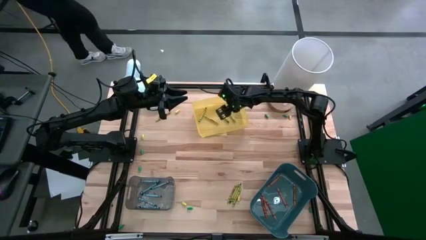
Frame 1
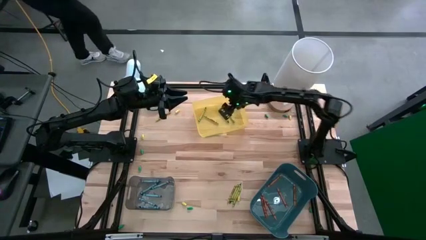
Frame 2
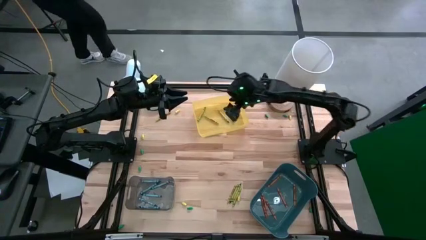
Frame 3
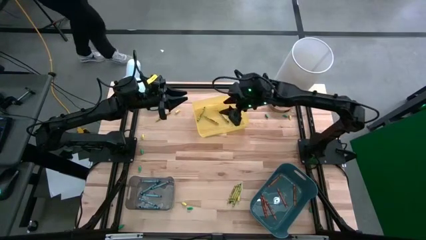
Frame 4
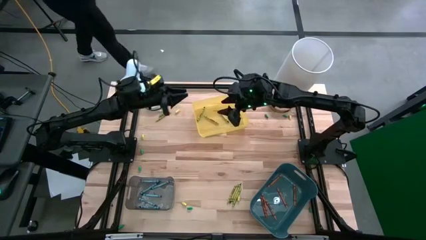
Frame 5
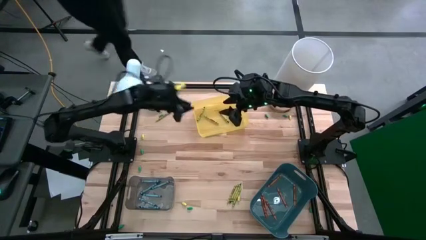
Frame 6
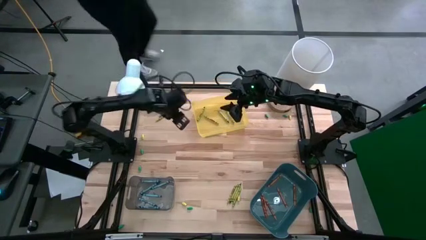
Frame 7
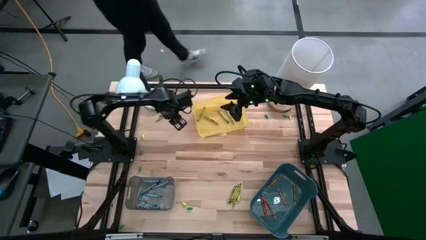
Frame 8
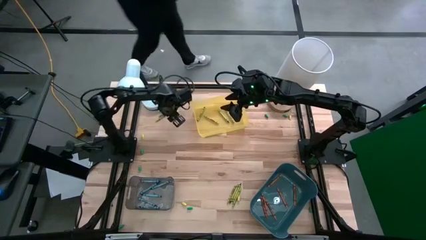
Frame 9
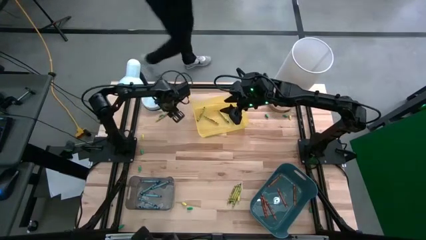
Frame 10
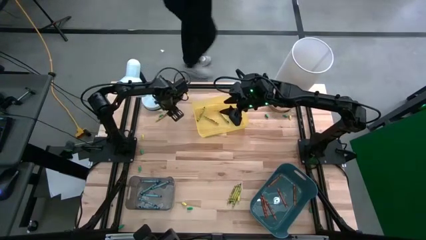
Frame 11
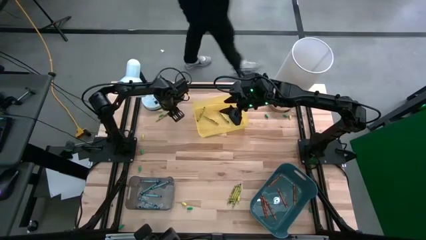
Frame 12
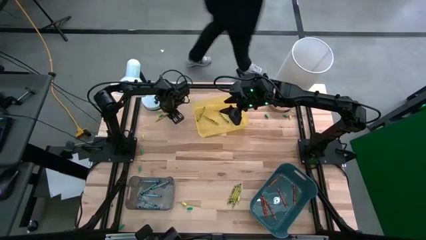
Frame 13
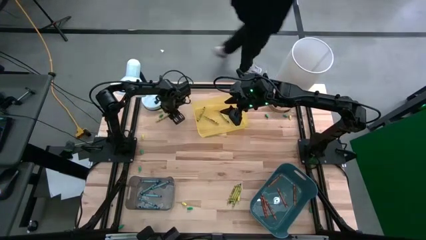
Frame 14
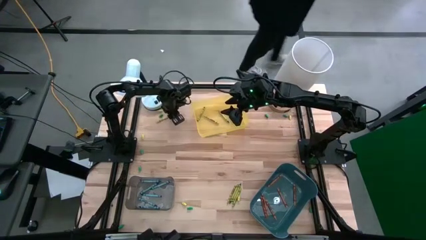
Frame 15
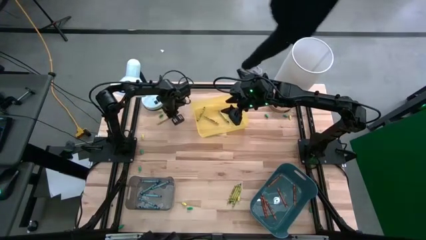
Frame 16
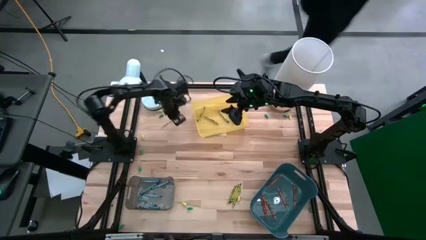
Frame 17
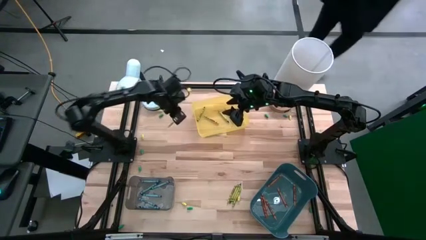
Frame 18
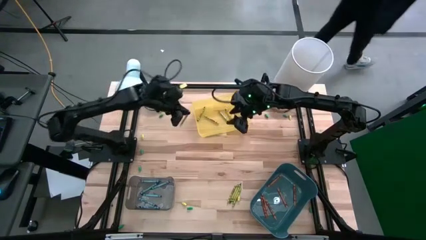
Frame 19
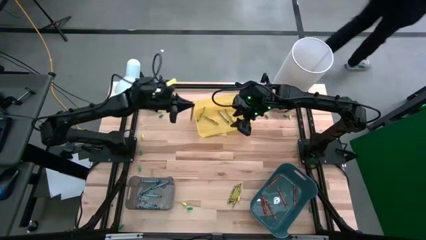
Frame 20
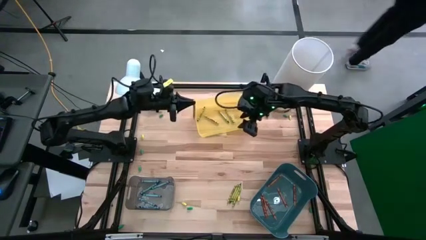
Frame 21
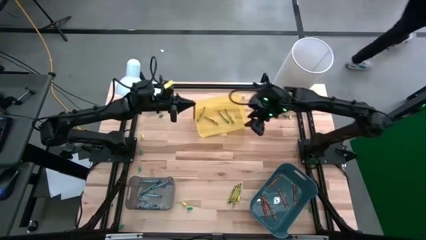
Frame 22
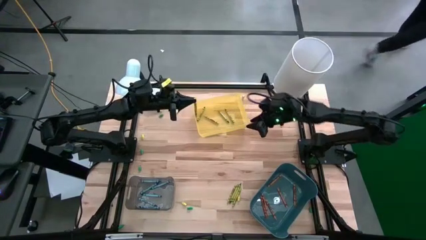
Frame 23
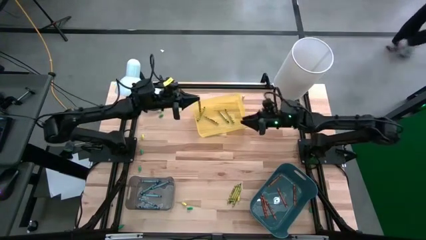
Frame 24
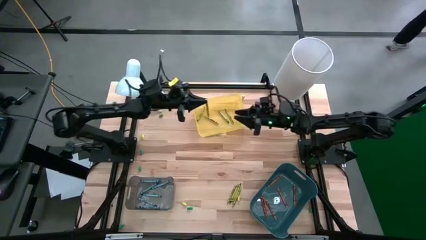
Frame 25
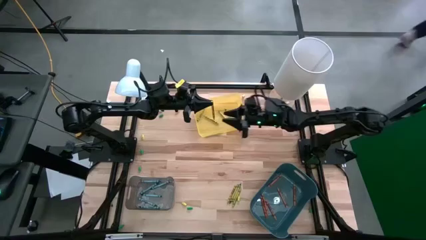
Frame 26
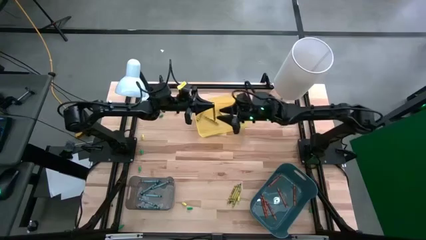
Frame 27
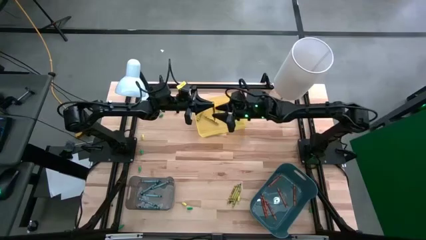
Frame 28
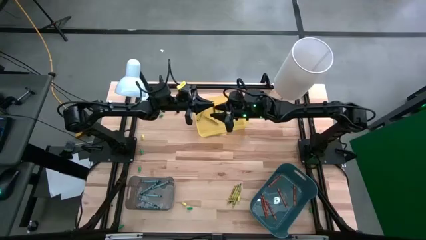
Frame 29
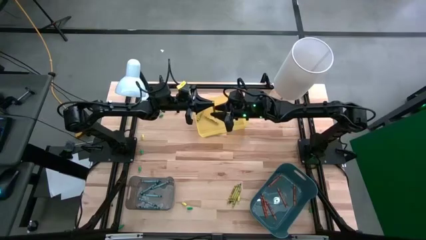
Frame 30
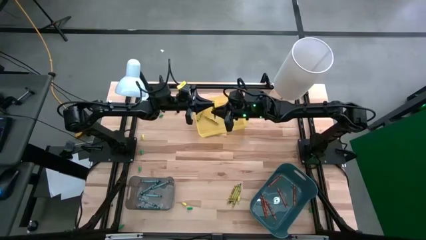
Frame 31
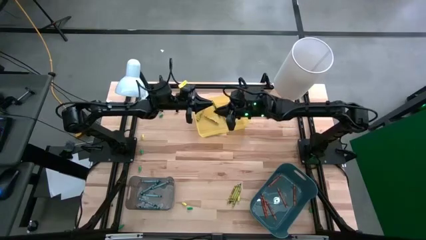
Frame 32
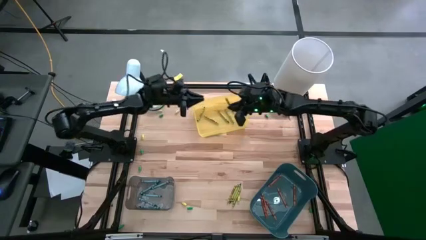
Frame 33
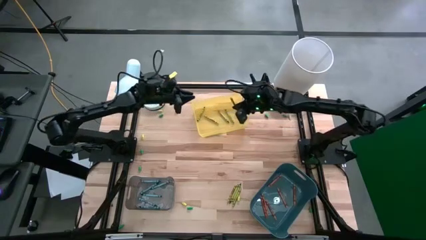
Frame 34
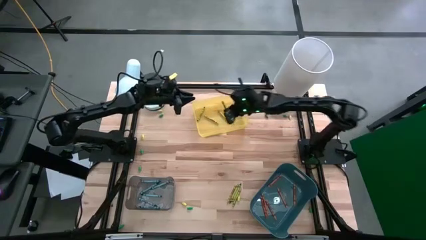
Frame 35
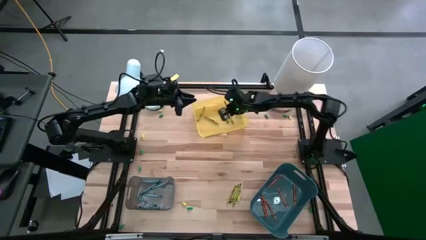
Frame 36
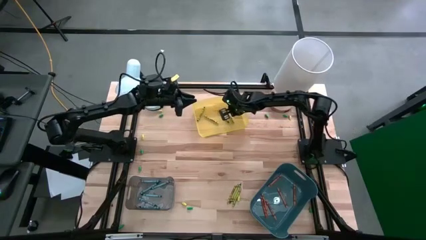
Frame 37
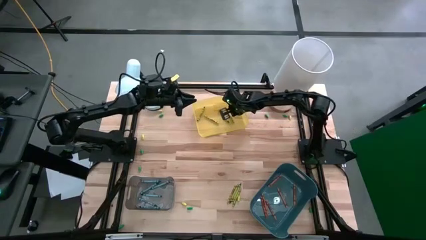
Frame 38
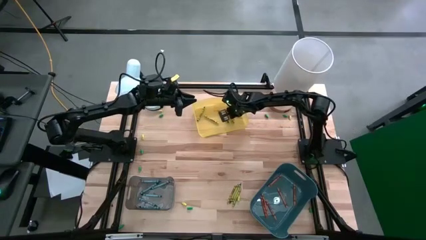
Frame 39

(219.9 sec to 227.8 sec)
Task: Sort crayons
Put the yellow green crayon into the yellow bin

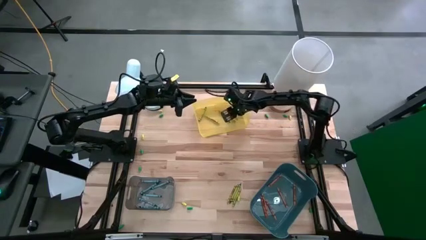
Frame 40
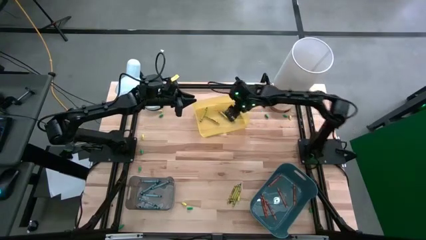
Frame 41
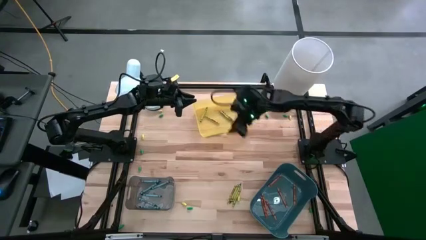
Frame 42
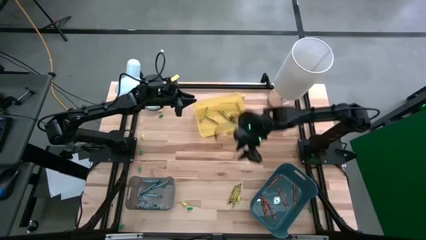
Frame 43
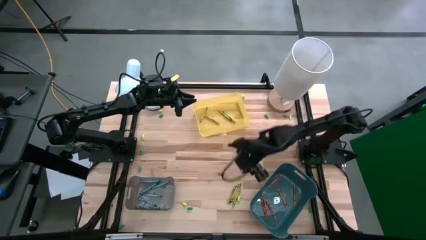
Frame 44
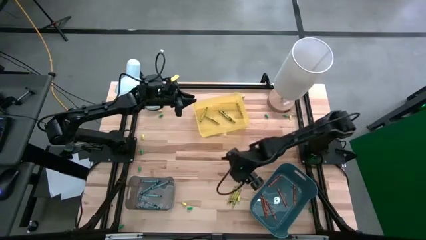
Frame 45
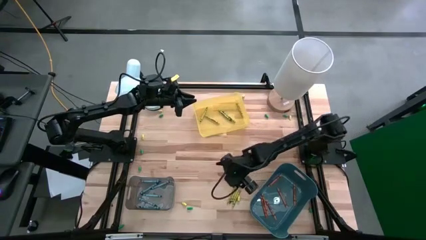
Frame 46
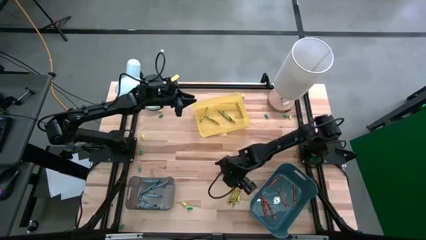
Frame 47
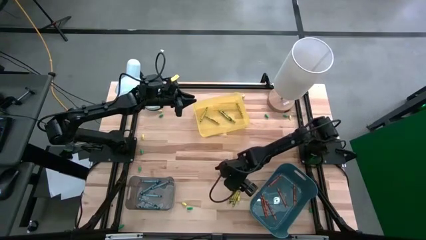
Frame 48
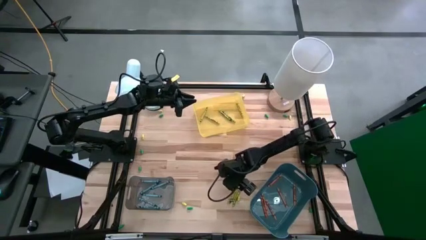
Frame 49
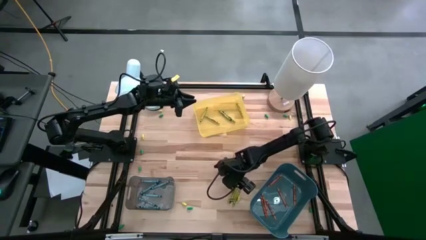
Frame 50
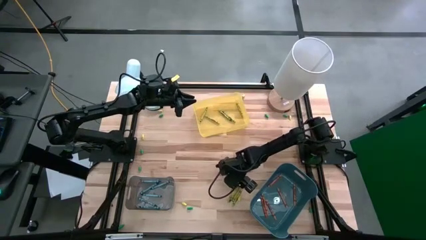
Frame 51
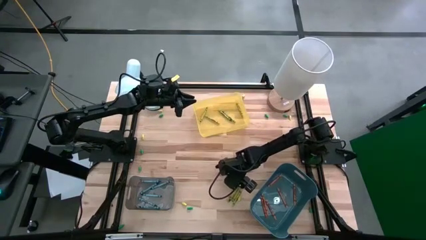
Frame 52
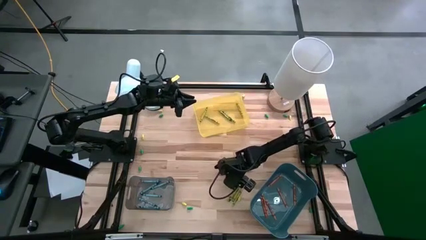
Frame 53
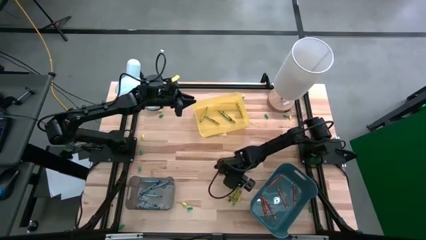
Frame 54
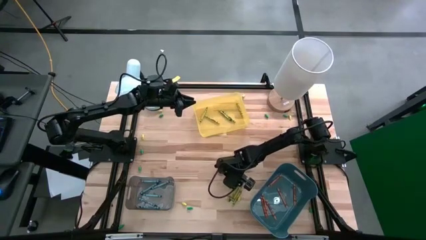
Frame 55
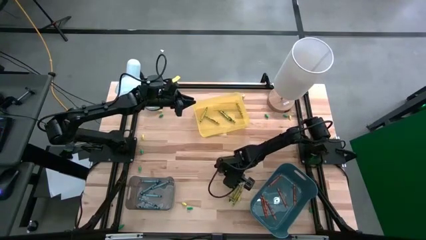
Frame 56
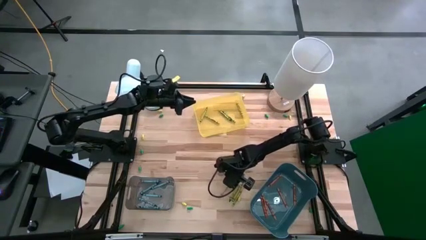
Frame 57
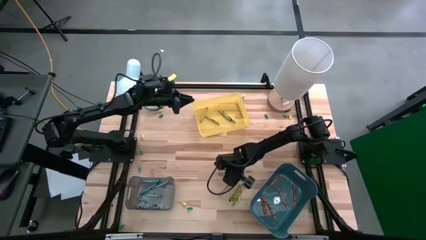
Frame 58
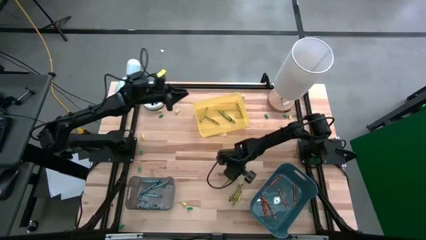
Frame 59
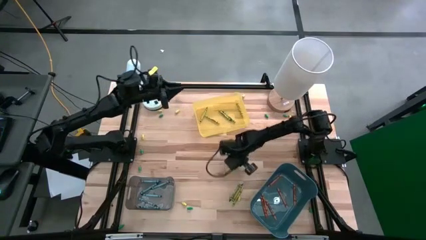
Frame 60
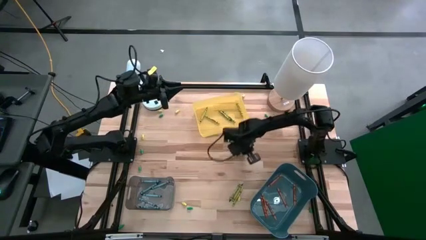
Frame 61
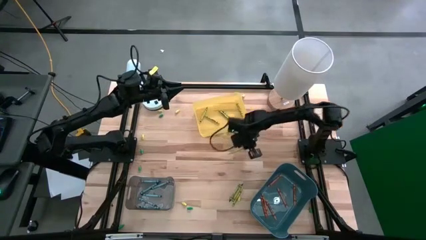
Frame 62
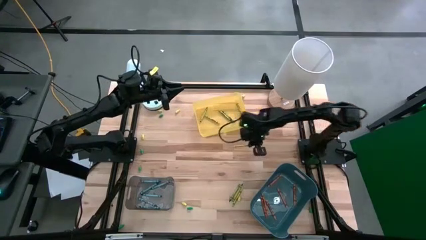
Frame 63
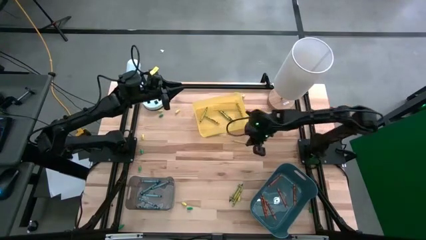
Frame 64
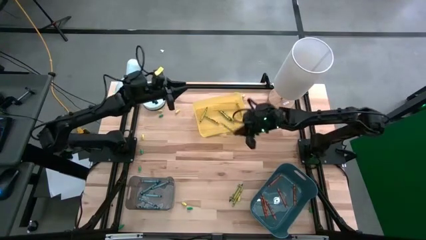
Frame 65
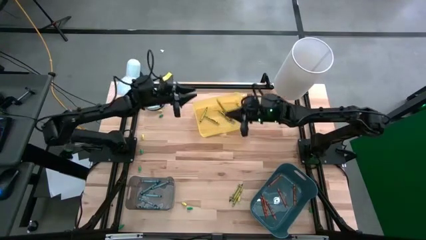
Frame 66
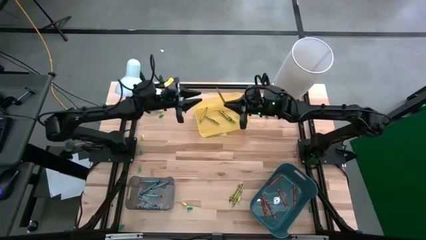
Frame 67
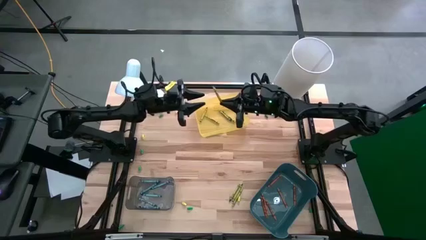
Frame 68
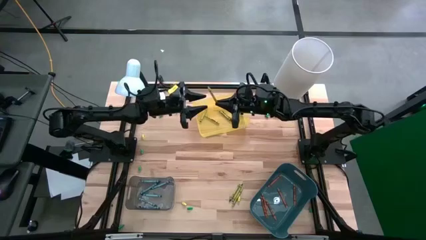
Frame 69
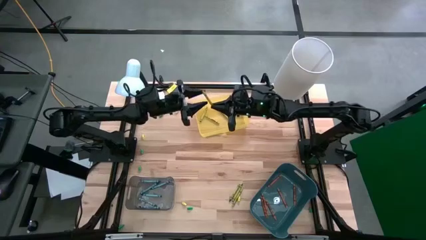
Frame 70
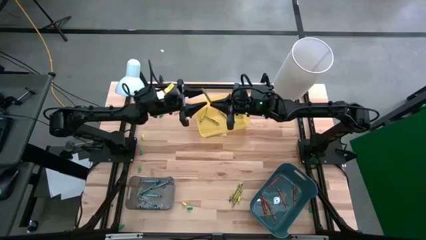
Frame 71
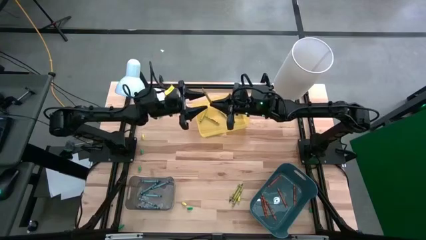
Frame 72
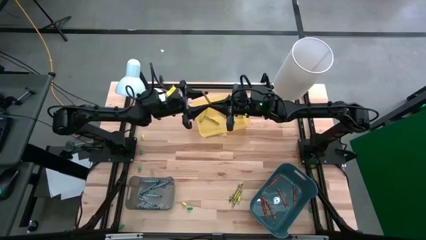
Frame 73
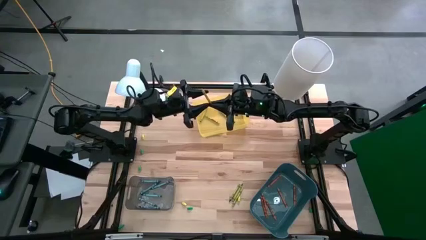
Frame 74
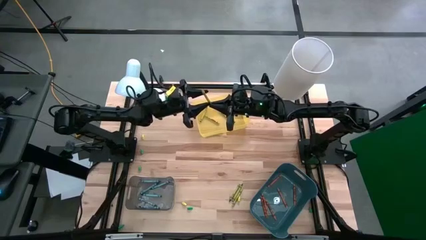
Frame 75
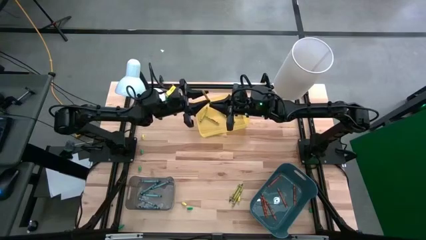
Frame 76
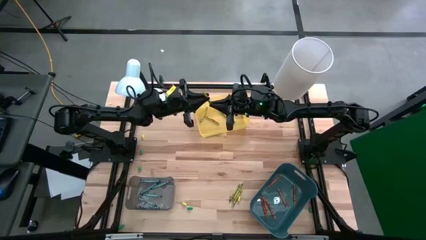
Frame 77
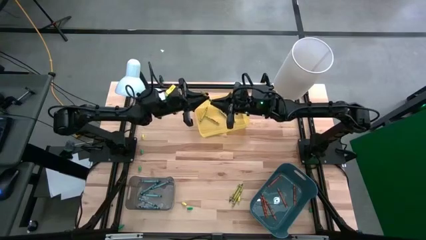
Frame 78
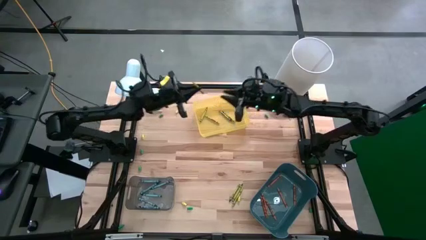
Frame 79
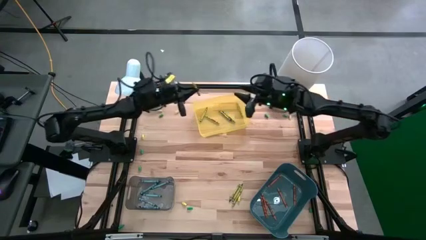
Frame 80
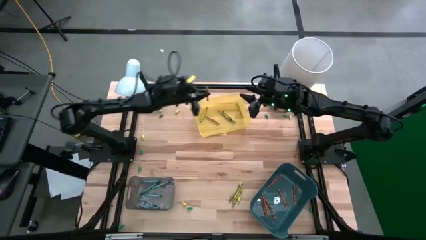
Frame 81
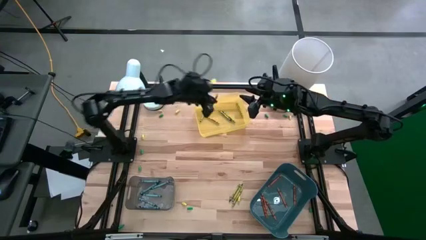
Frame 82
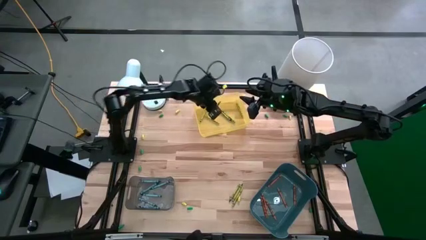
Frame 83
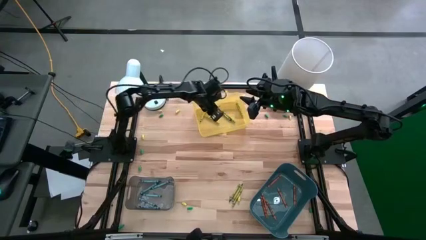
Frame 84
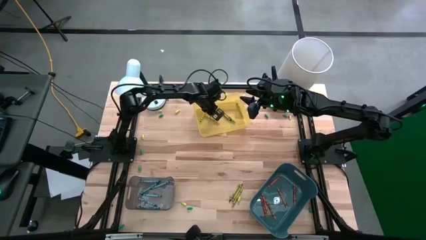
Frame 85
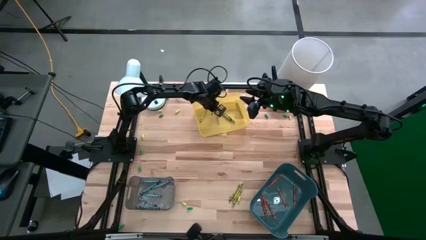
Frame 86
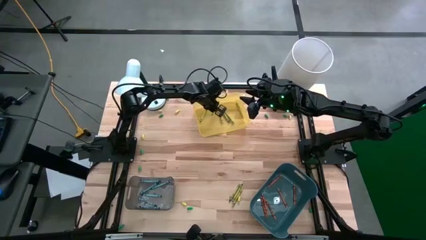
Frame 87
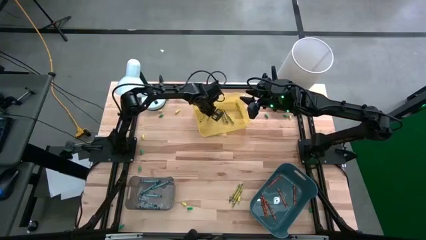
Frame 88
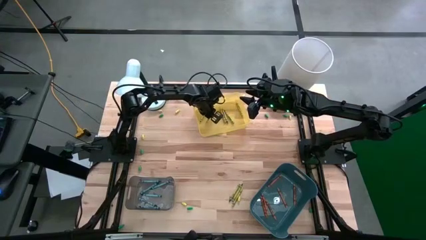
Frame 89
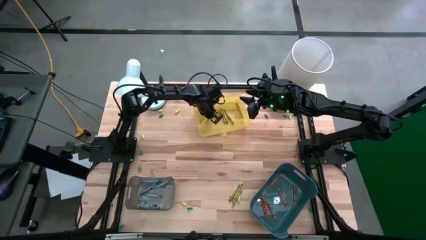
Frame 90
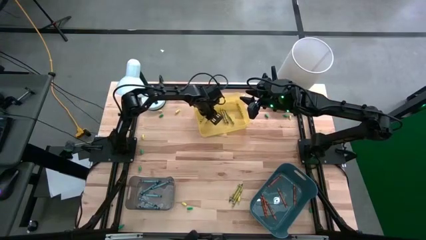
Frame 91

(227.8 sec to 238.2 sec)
Put the yellow green crayon into the yellow bin
